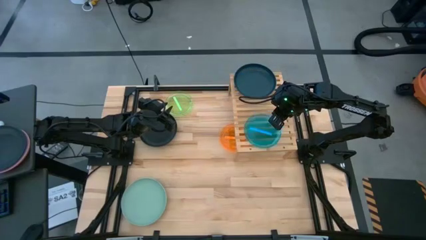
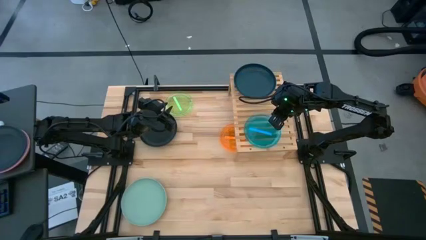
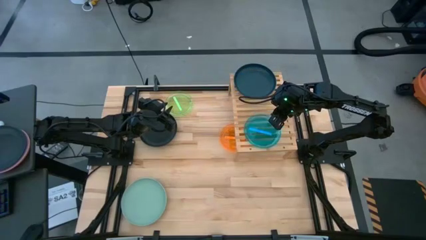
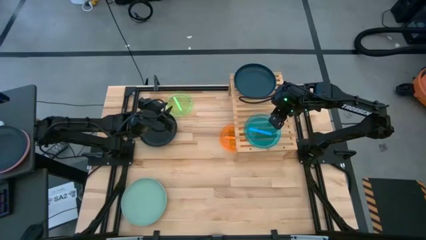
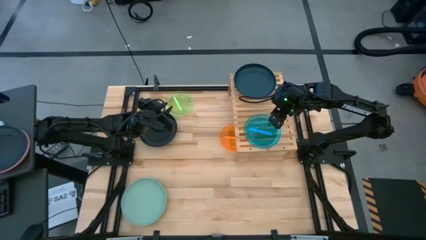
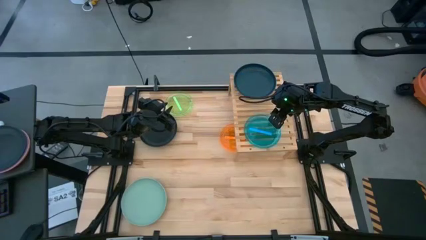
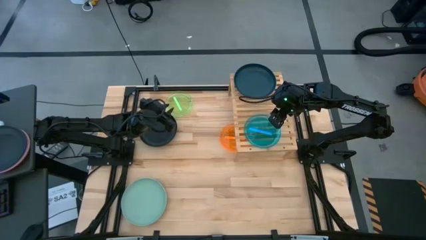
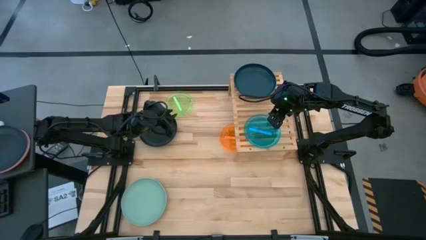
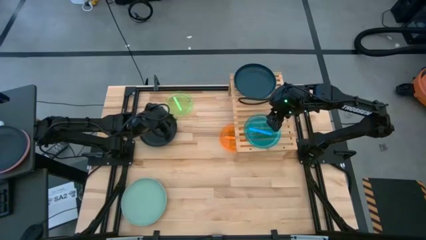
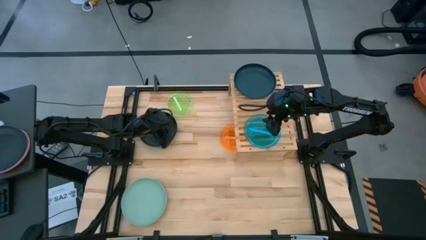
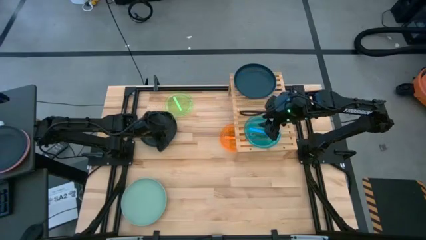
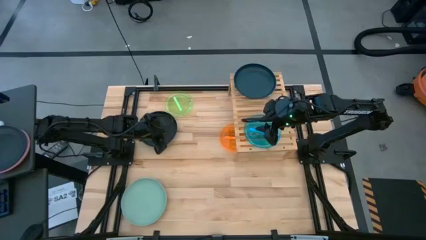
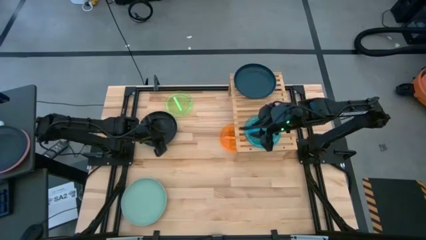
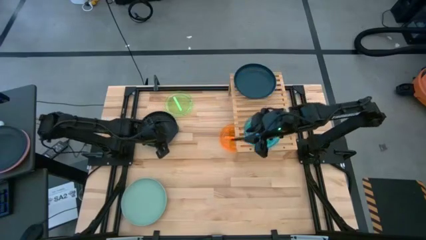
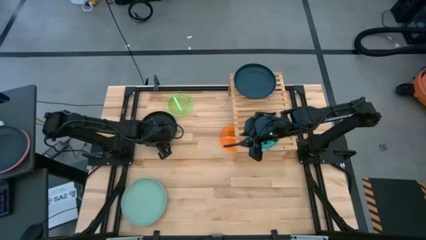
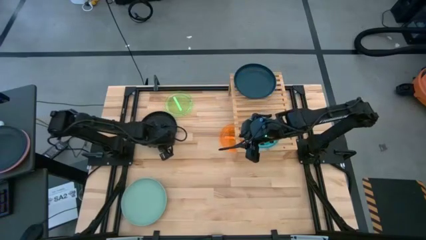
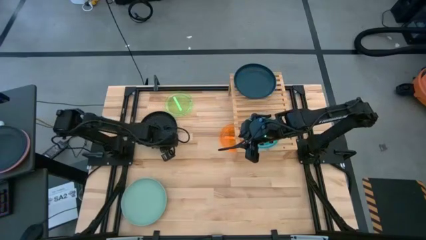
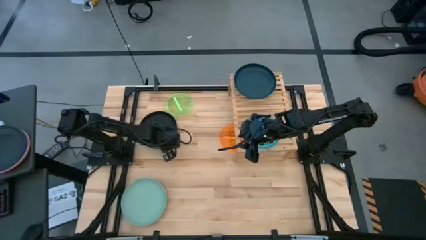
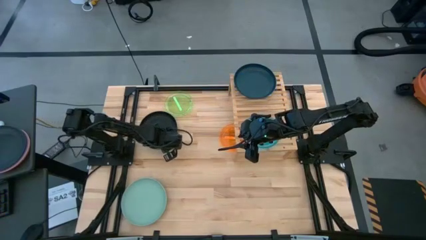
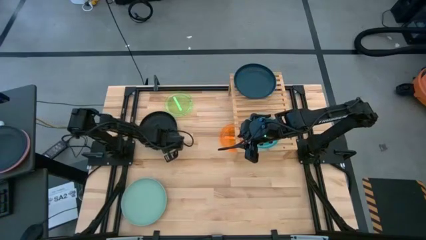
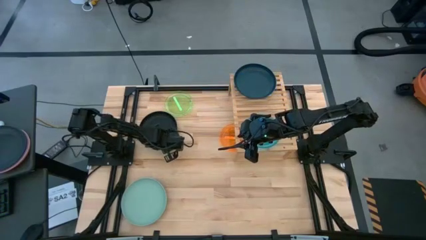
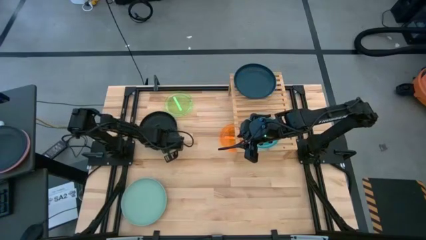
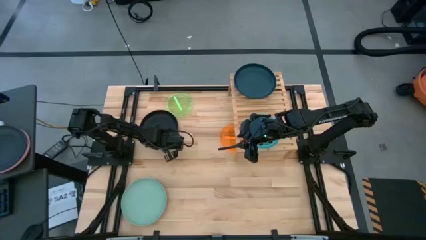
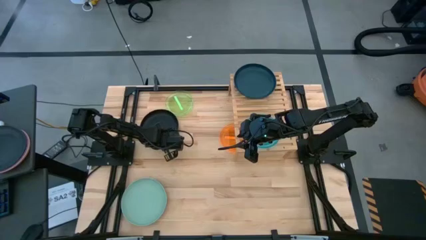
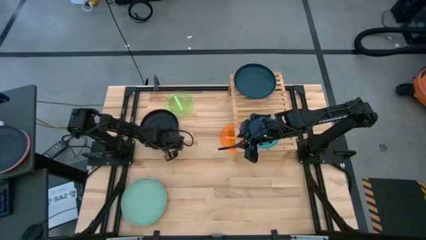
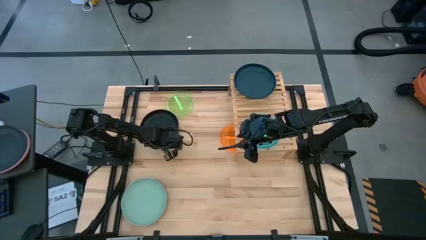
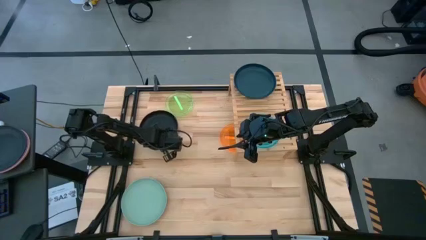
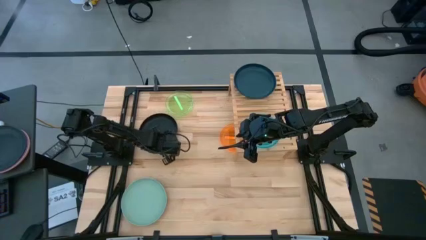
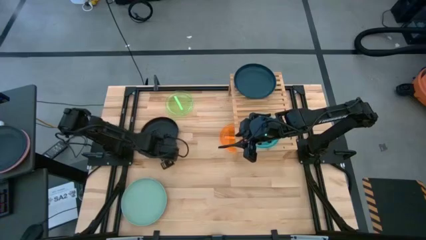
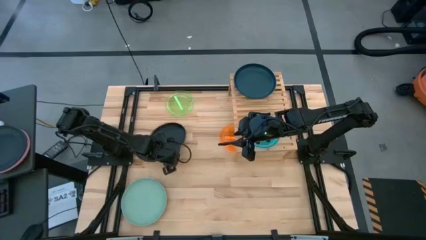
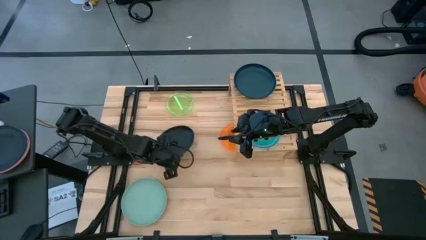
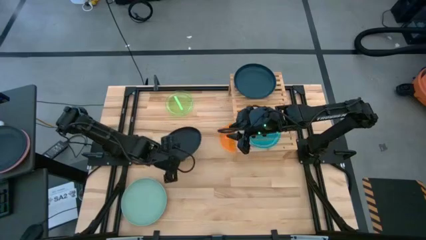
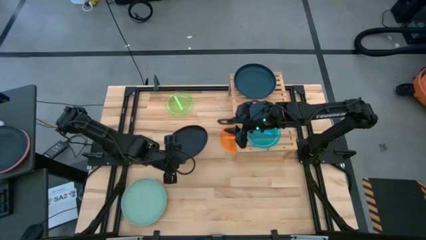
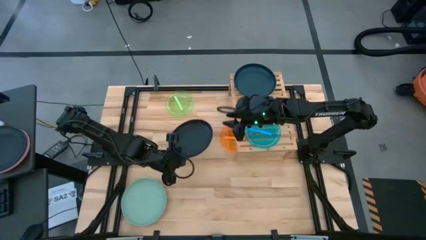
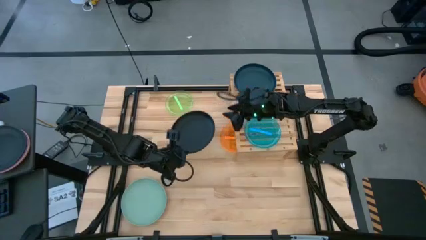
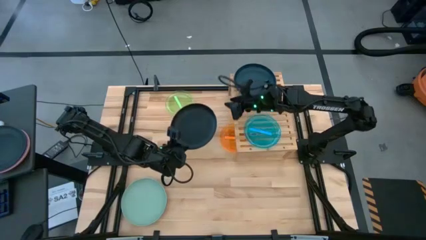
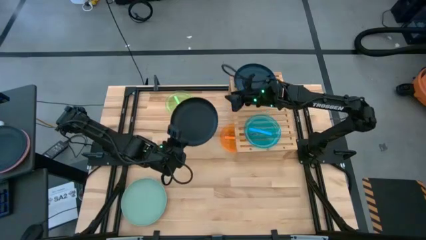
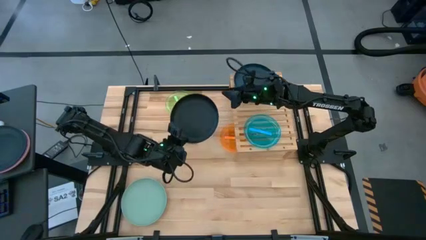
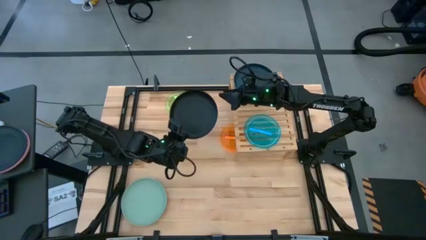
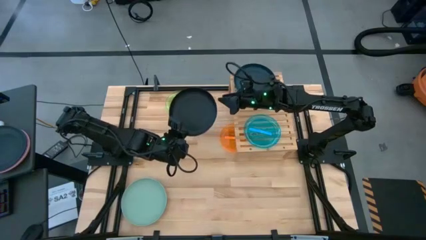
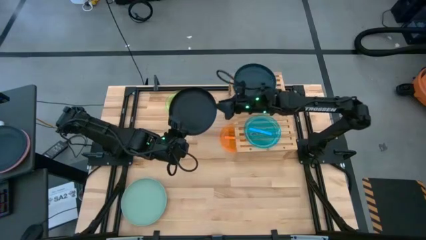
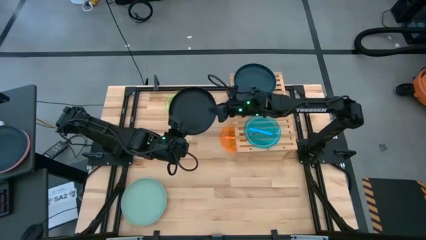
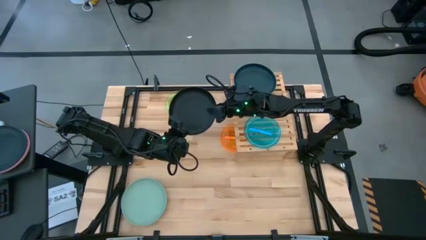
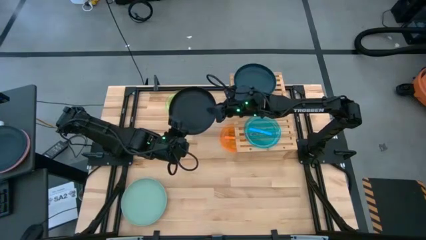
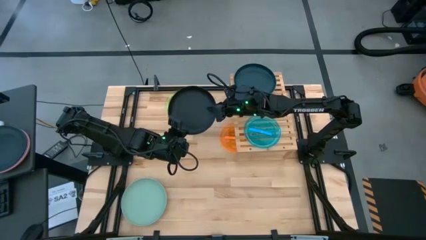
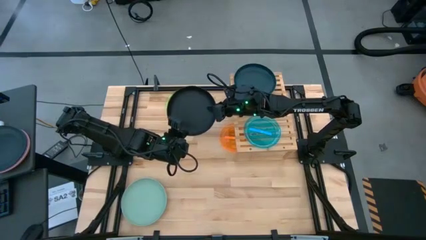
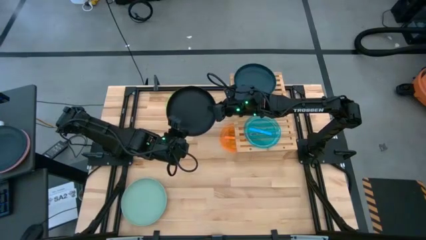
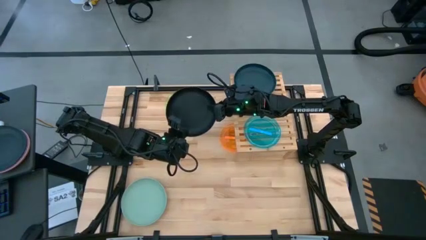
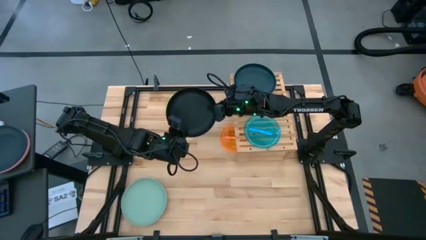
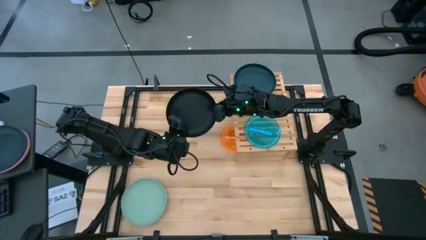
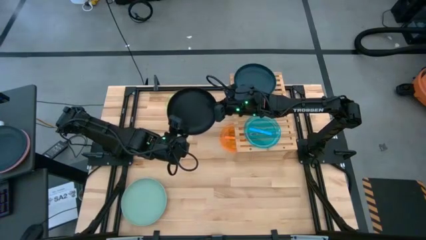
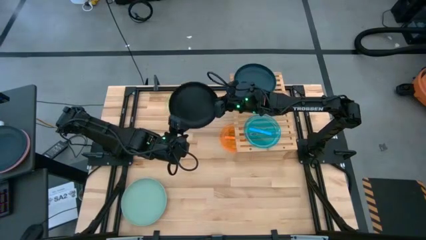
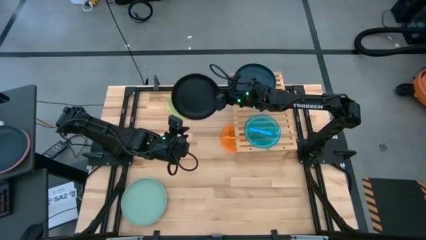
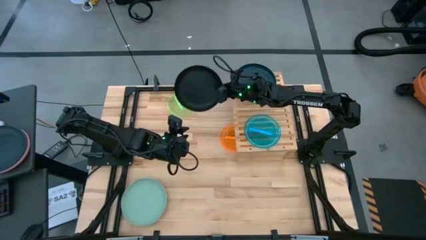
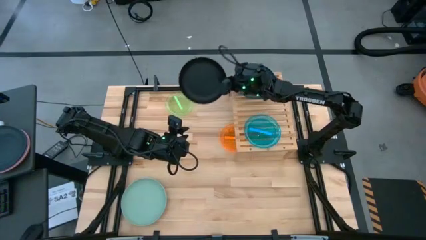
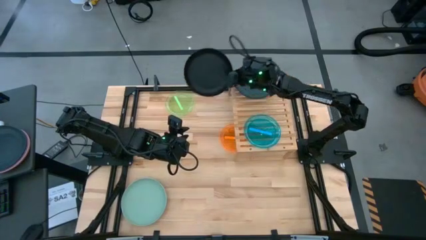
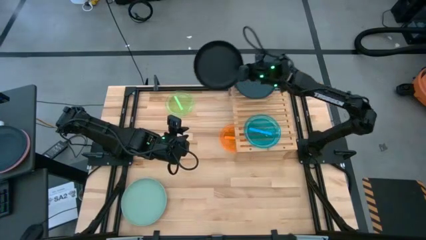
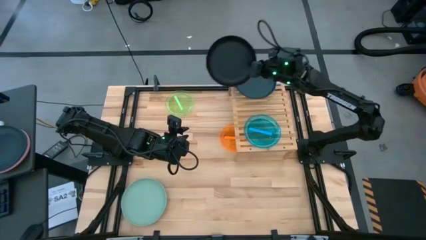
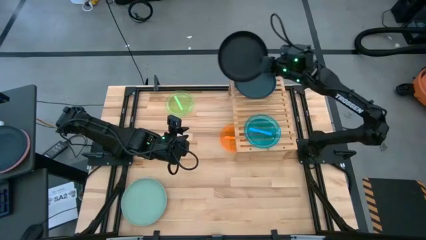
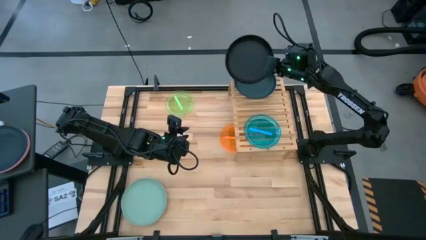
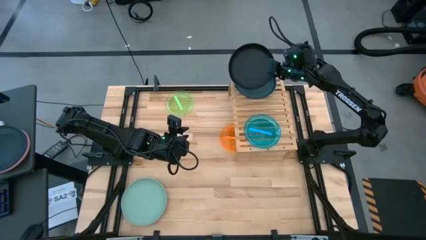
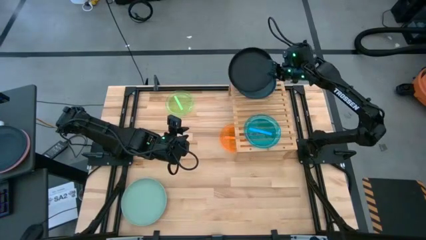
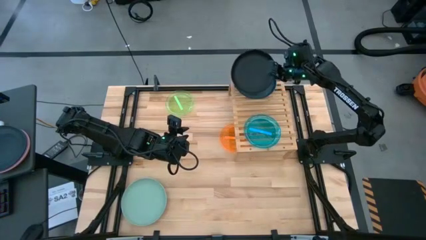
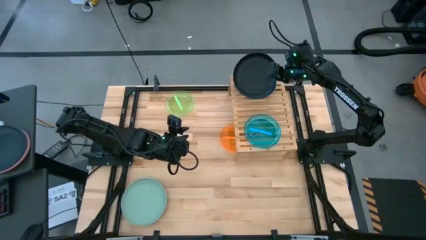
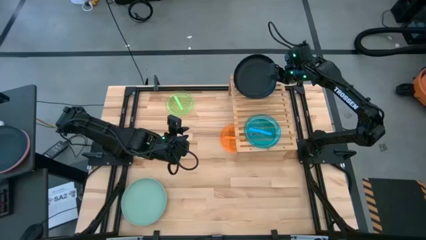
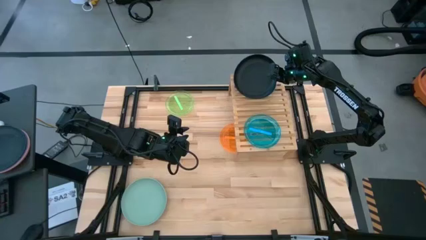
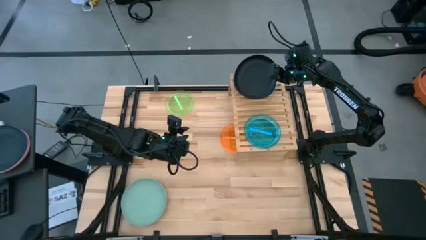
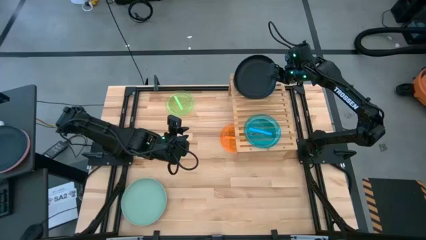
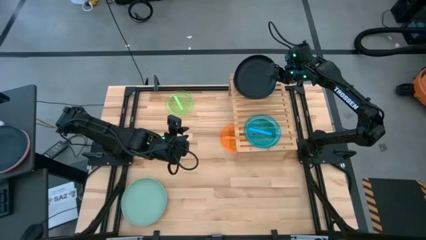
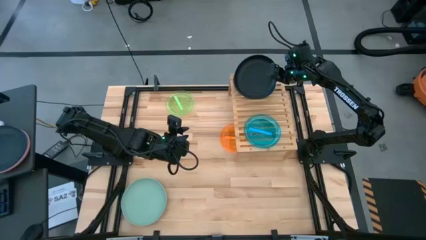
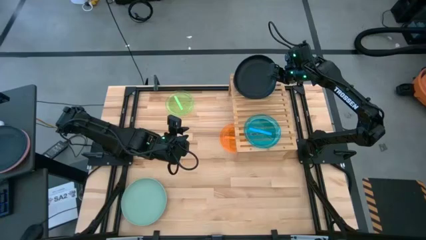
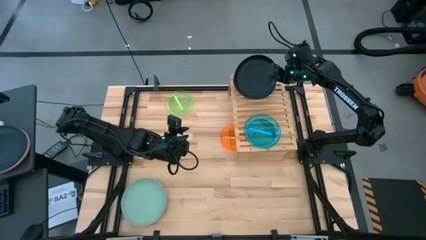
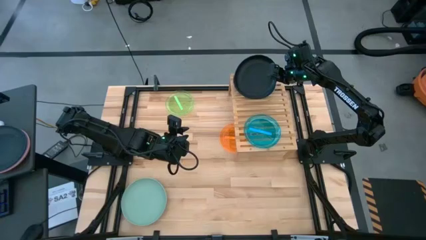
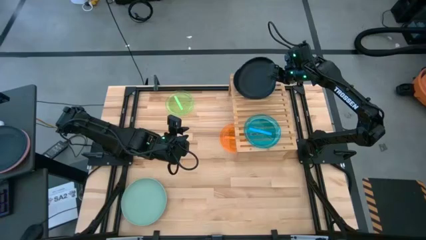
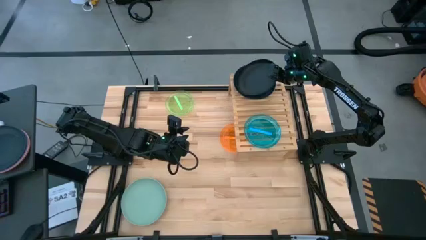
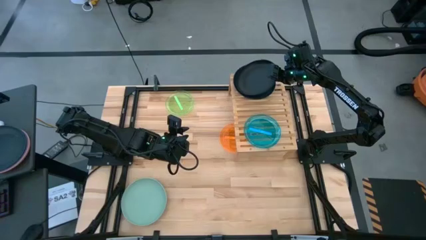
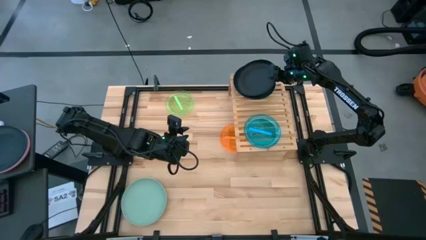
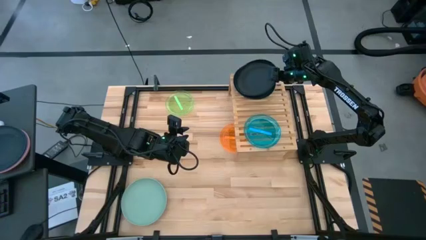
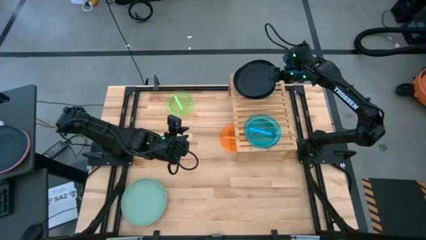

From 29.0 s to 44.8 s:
Task: Place and stack plates onto a shelf
Stack the black plate on top of the dark blue plate on the shelf
